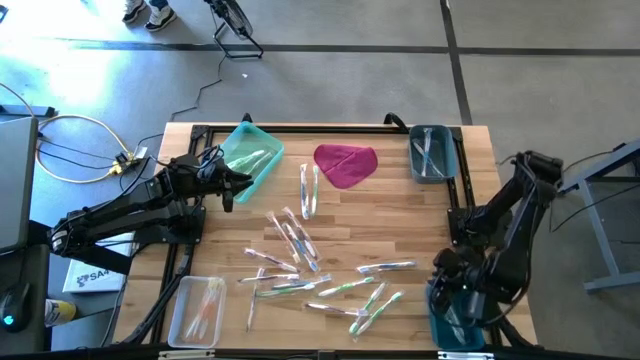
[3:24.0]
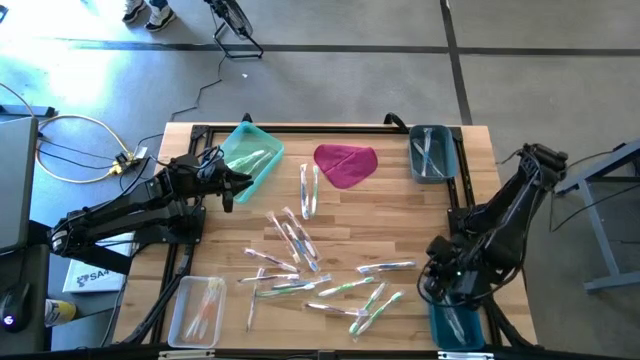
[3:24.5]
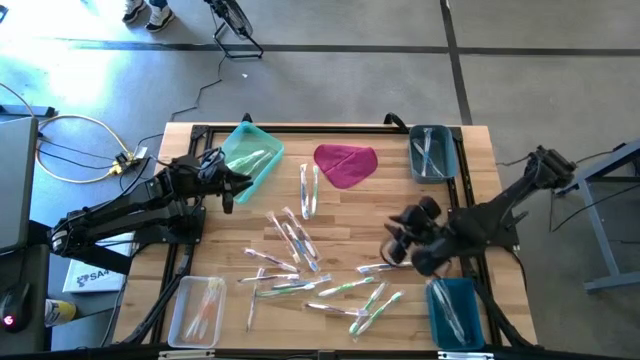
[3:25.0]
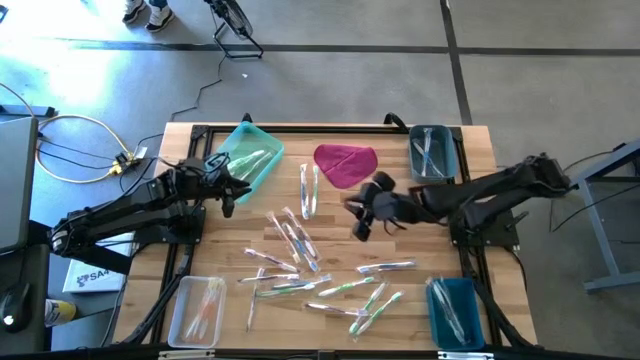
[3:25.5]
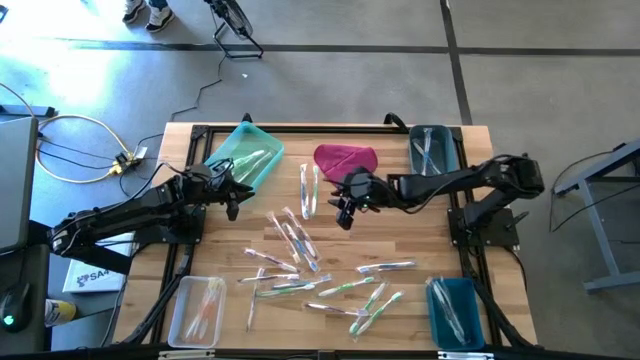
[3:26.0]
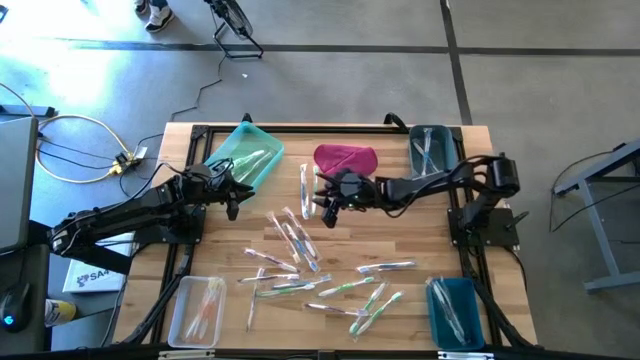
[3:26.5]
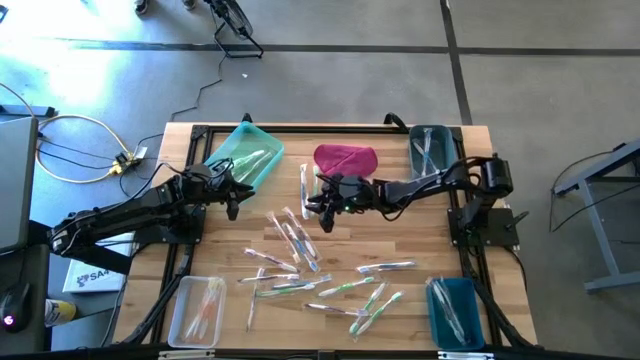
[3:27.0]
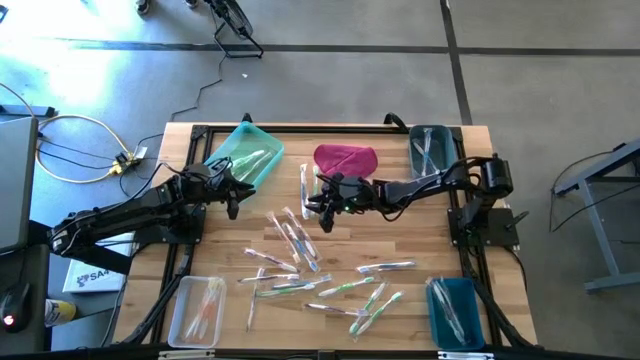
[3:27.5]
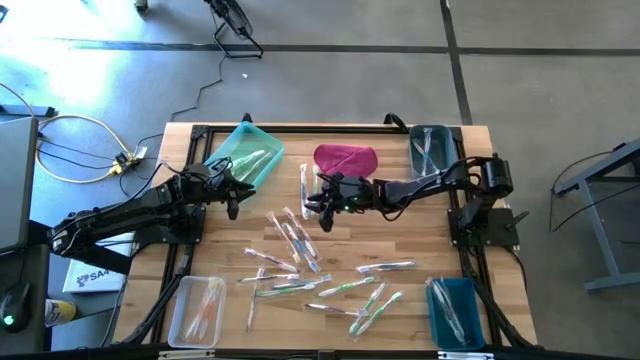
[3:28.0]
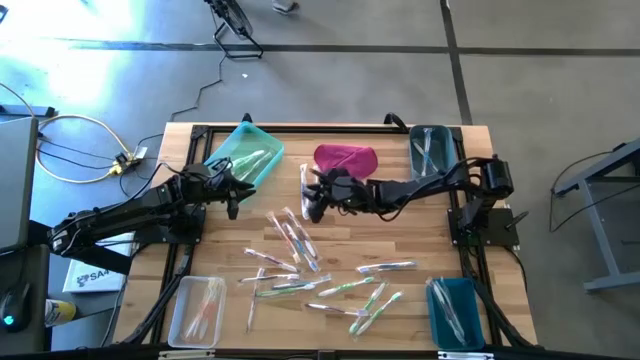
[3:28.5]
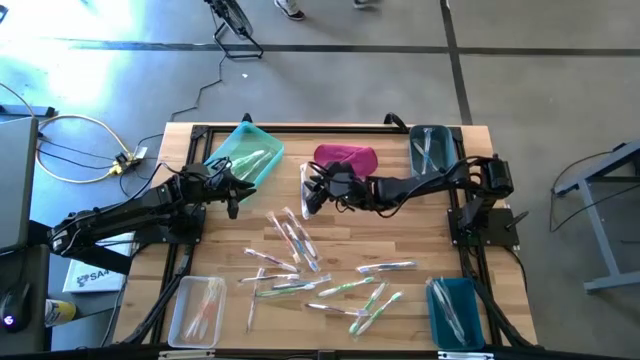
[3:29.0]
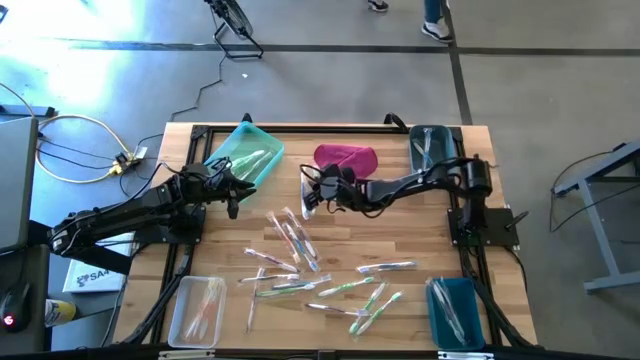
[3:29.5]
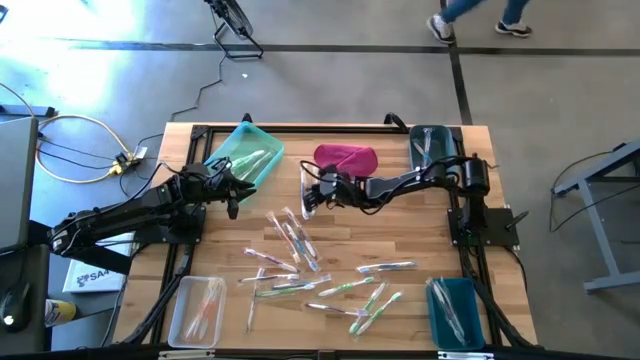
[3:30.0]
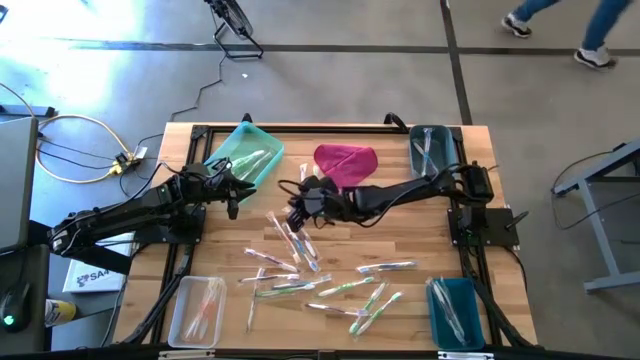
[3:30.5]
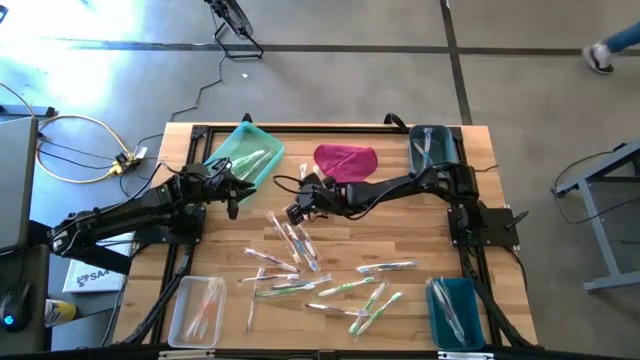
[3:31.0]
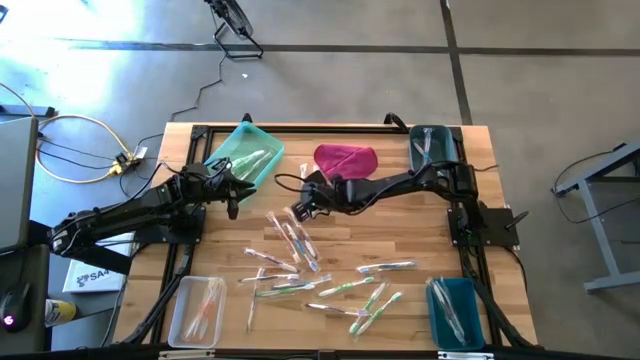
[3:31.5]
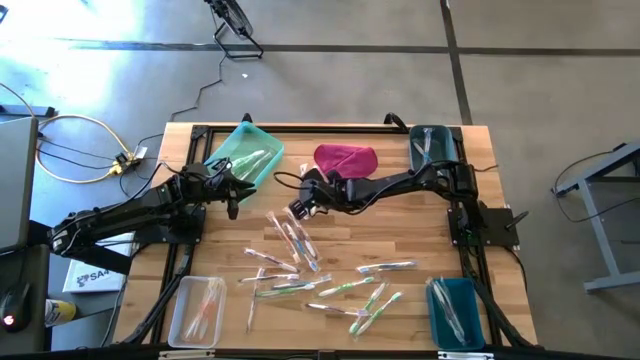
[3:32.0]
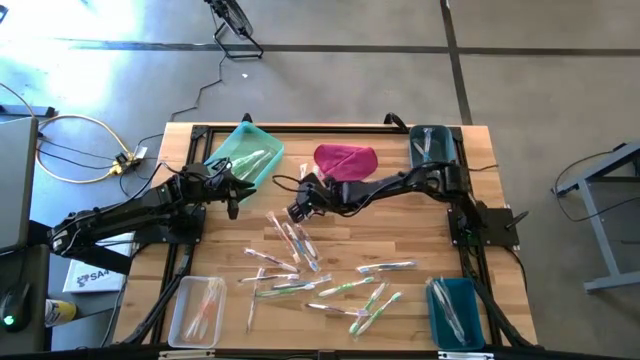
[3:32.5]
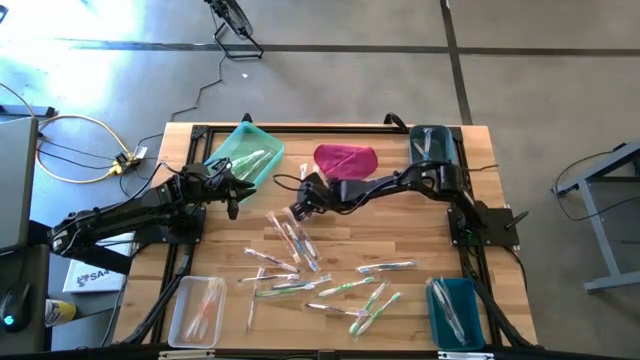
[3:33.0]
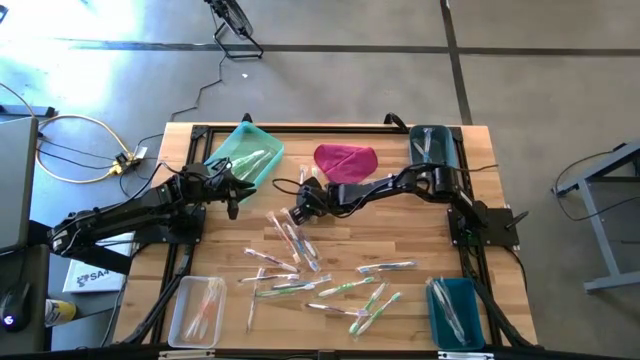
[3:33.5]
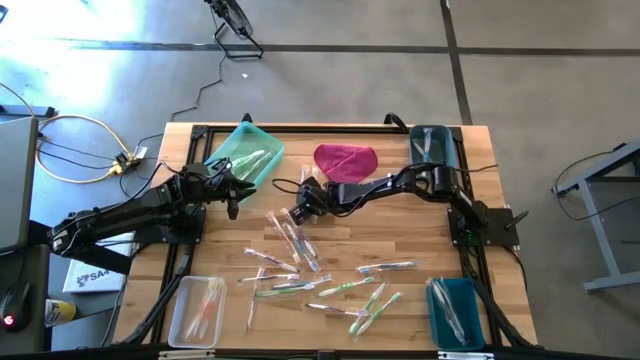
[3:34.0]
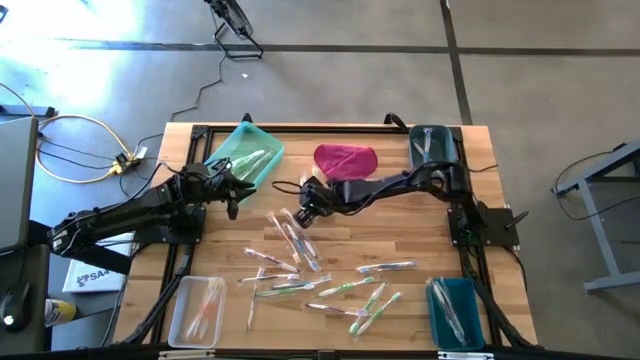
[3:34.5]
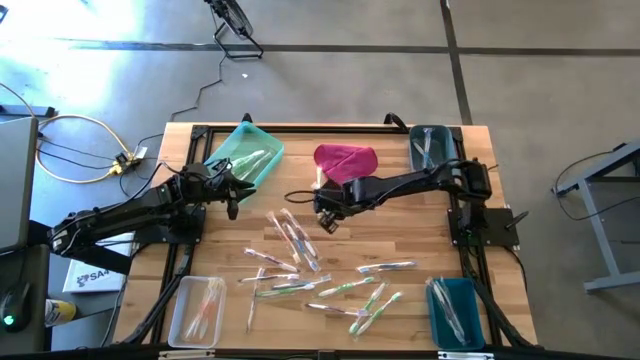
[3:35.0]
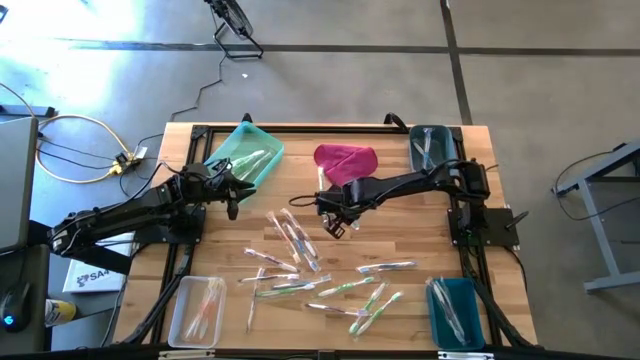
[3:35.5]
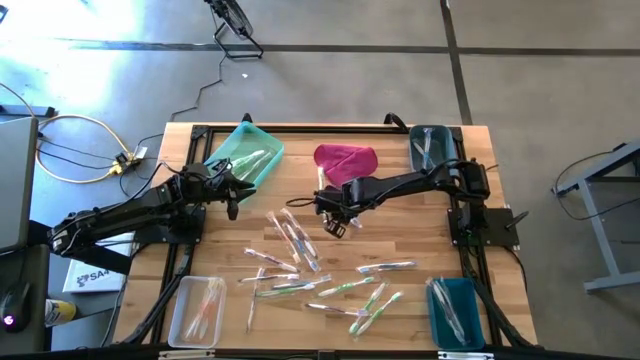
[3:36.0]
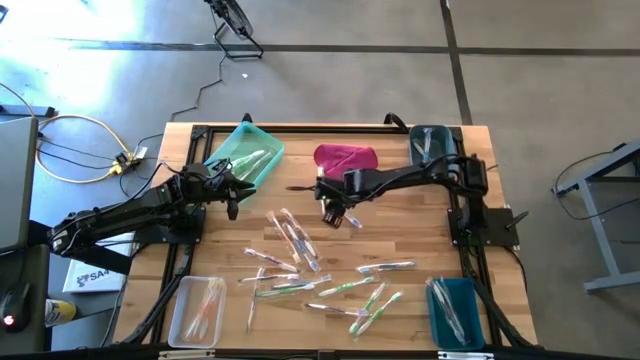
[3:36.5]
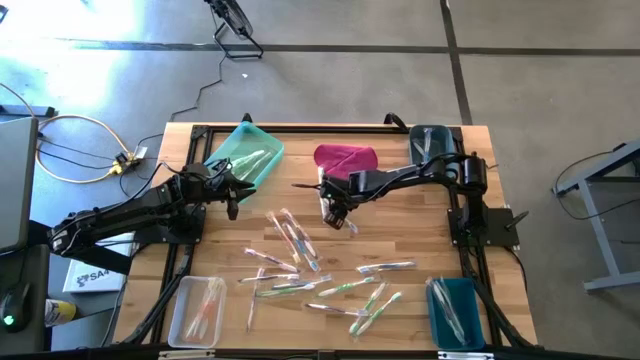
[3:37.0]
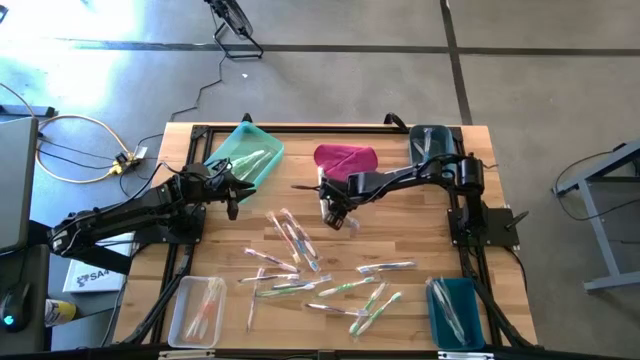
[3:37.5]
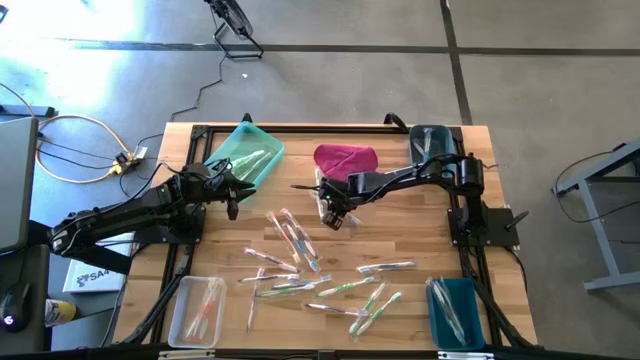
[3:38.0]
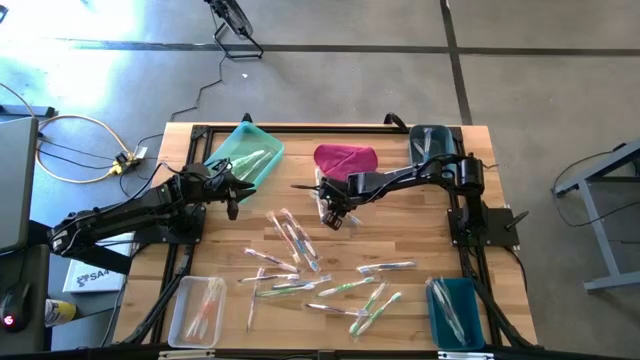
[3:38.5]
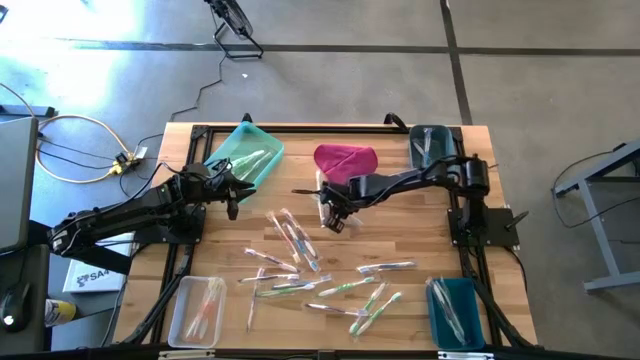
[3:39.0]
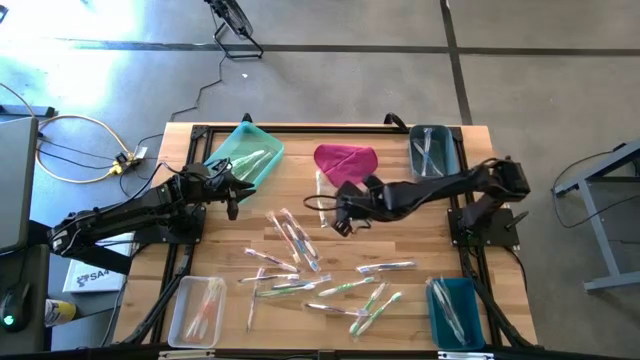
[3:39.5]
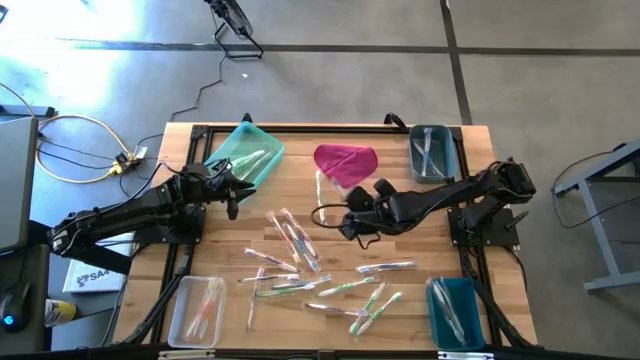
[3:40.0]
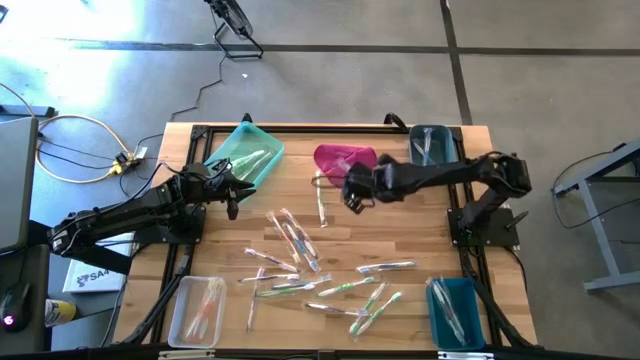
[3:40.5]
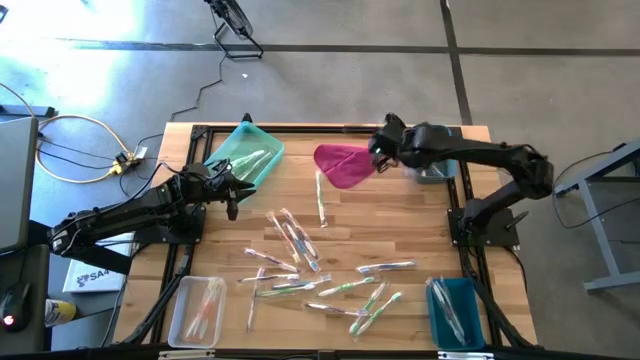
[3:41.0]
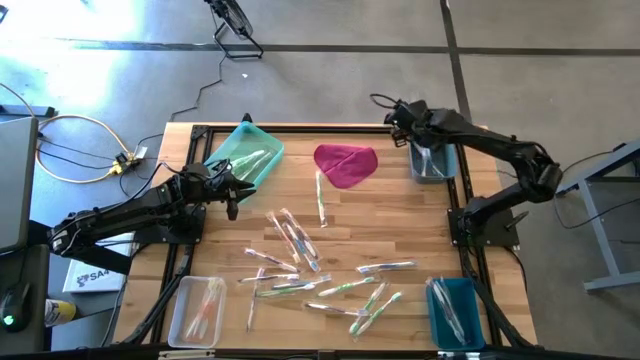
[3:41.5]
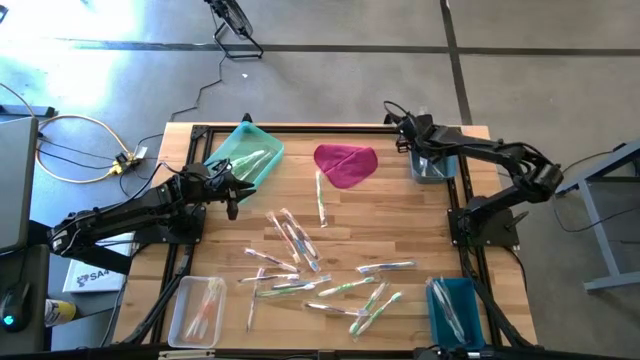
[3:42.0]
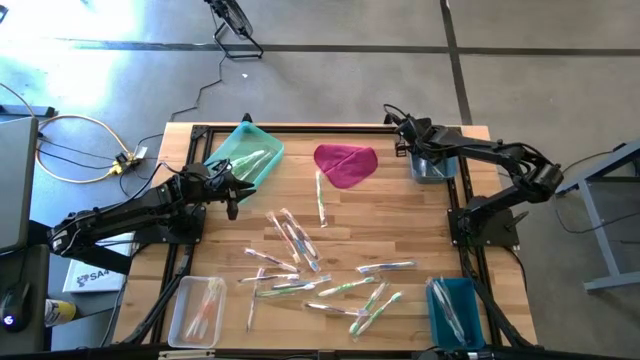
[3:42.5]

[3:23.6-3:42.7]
Task: Pick & Place Toothbrushes
Put the blue toothbrush to the light blue bin

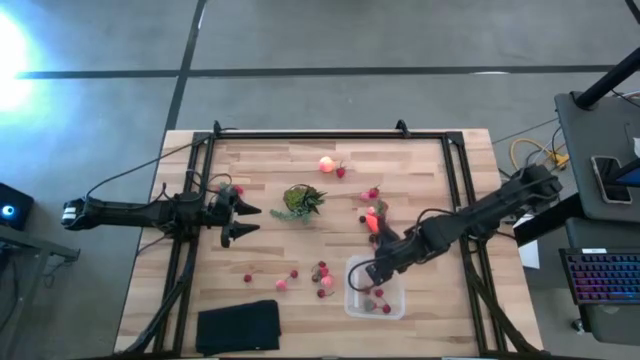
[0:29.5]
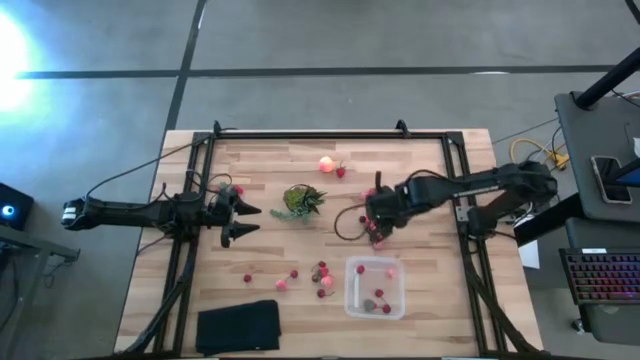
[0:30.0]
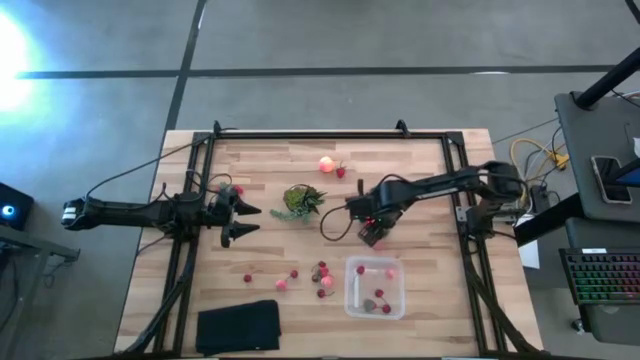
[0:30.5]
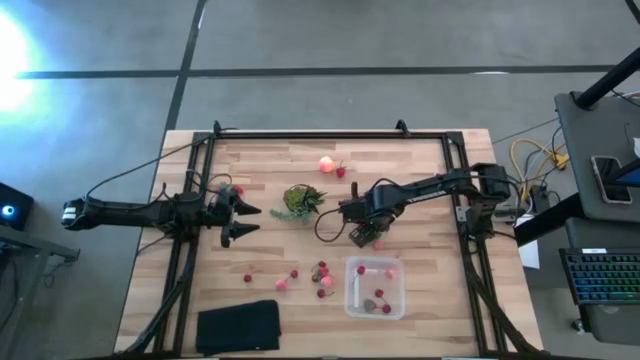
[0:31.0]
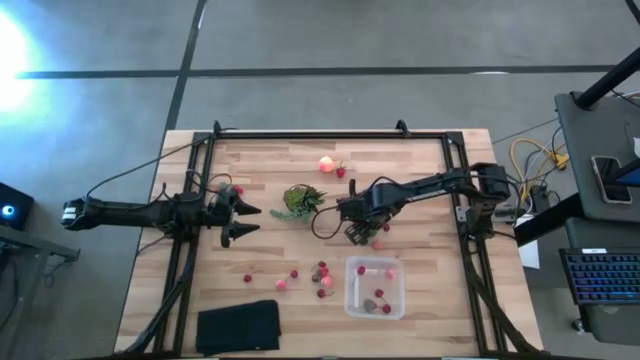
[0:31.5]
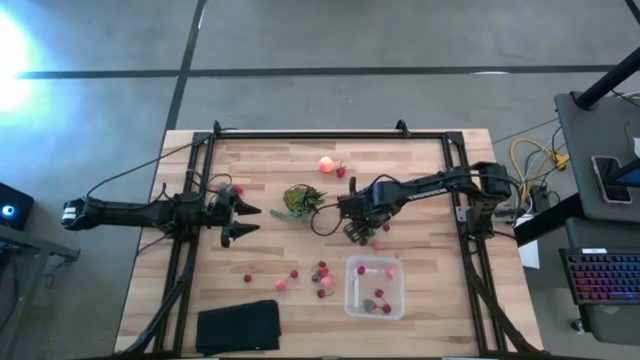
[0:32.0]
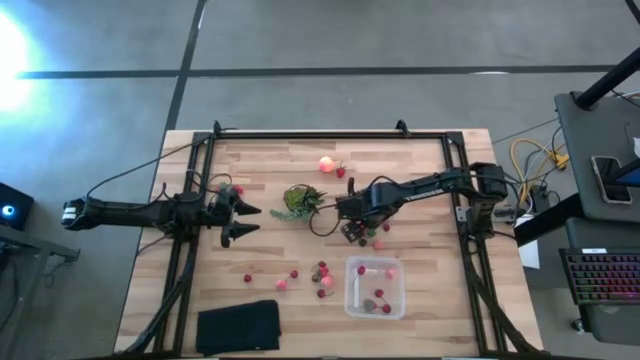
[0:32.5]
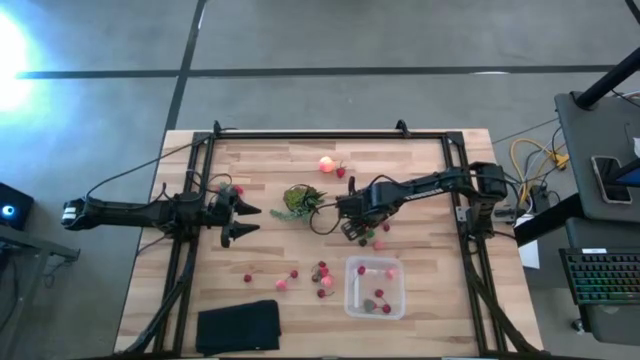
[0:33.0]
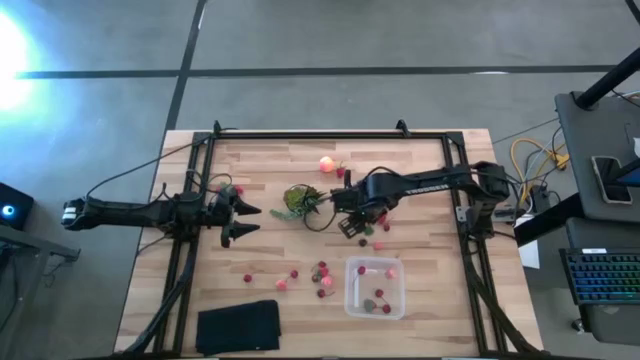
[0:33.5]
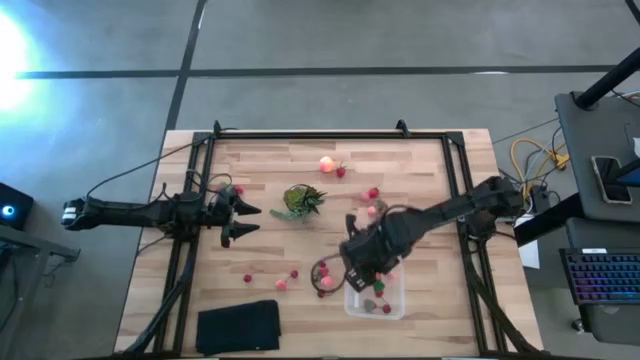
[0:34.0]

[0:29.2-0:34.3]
Task: Pick and placing Produce into tupperware
Put the carrot into the bin
